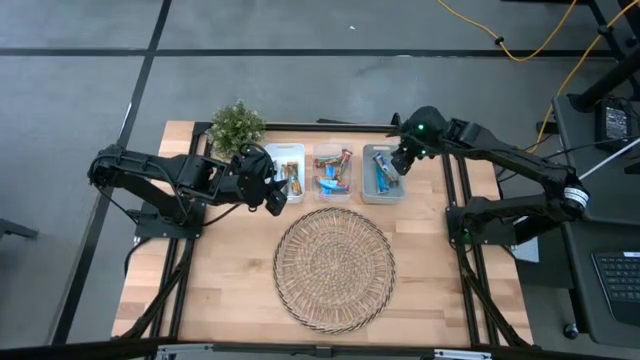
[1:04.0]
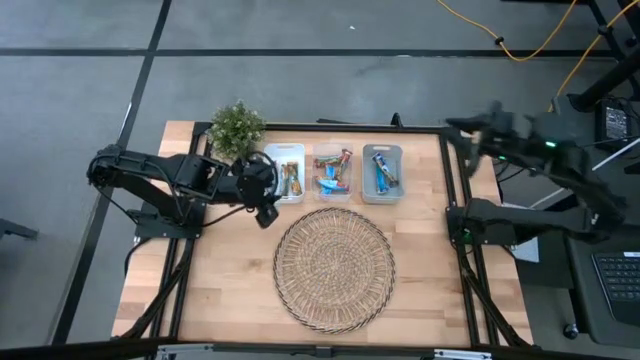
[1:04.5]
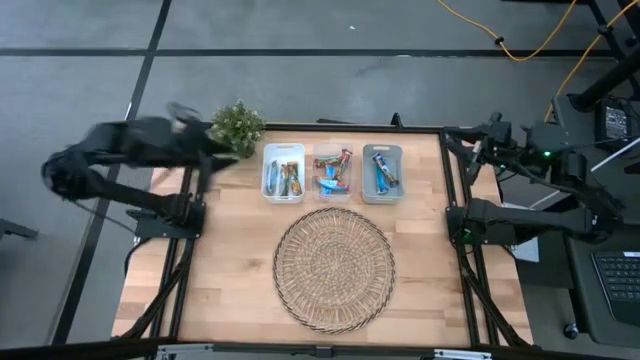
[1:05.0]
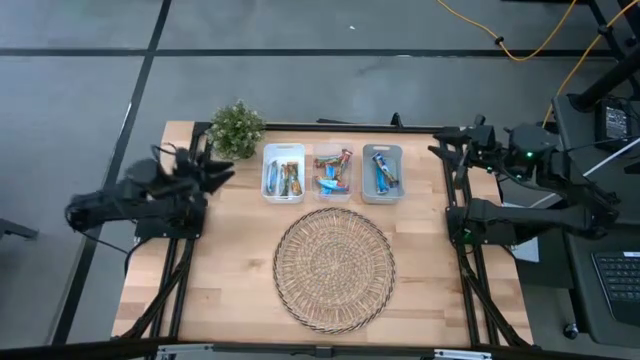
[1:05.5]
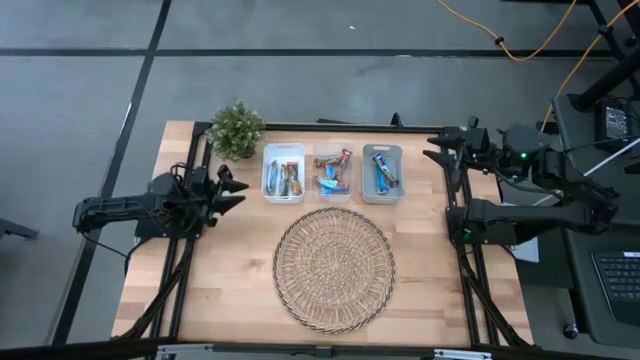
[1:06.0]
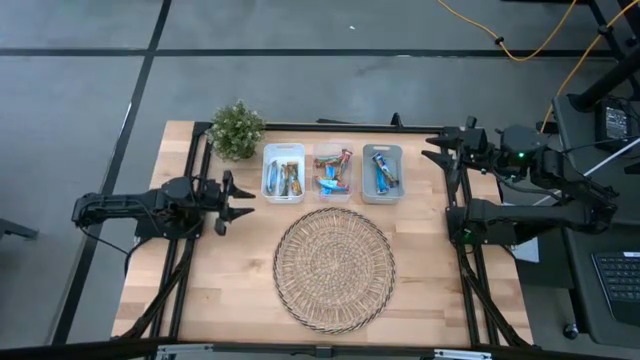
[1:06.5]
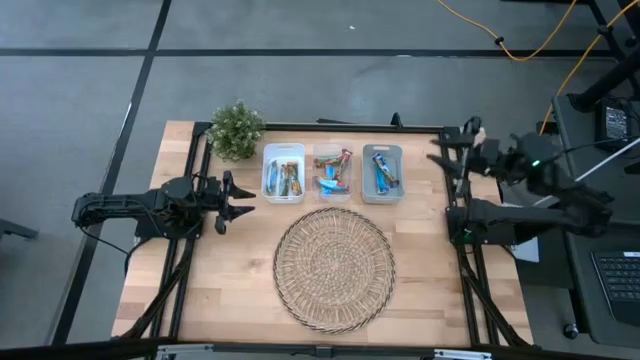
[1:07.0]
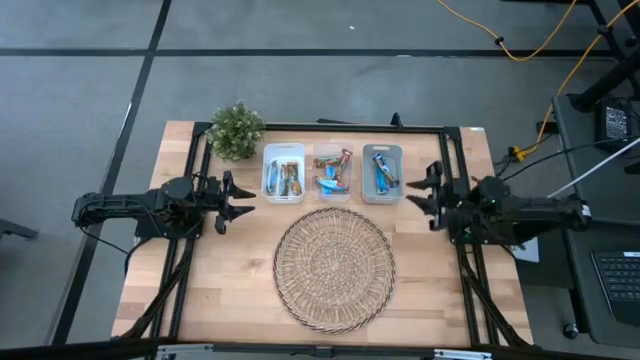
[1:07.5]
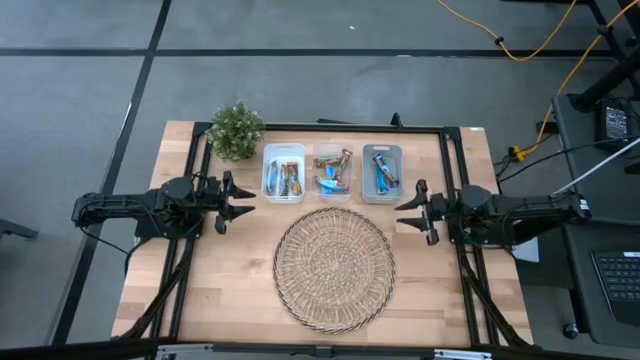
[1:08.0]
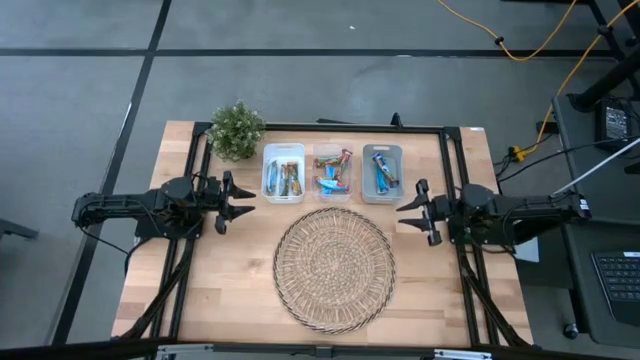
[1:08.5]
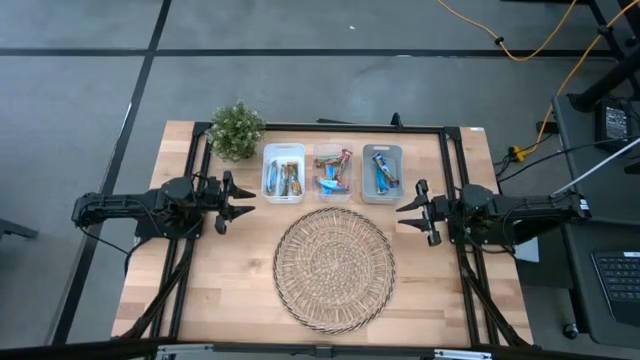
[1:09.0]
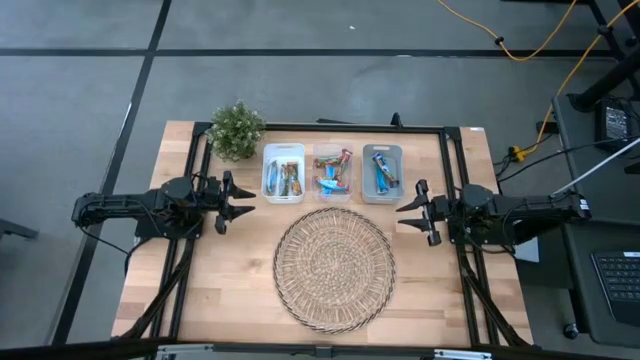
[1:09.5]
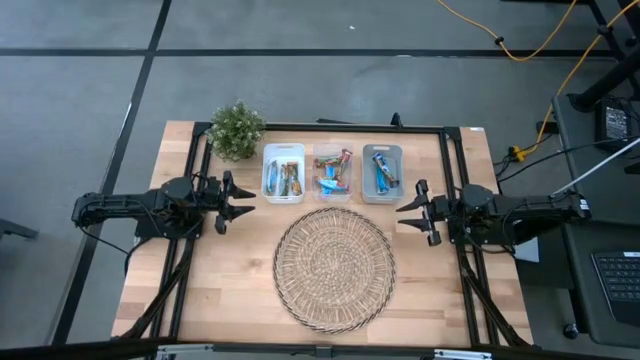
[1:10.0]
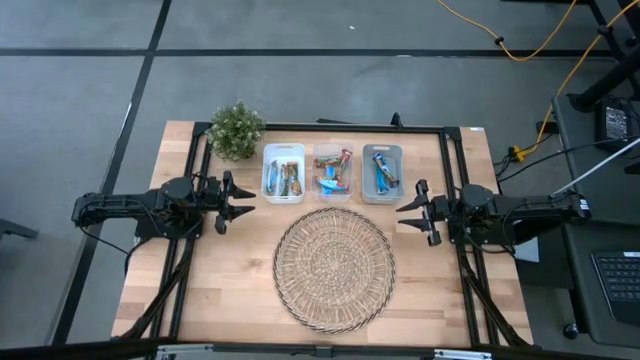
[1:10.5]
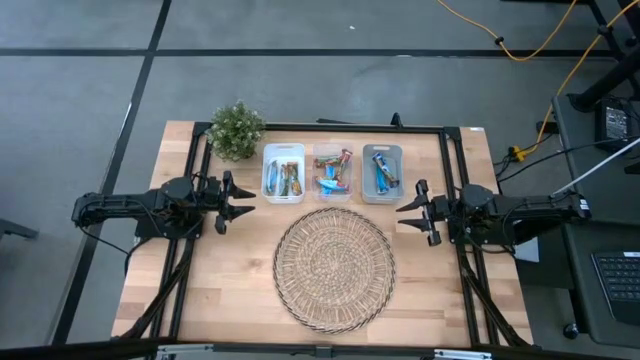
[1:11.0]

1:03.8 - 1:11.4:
Task: Pick and place Granola Bars by type
Return to Home Position

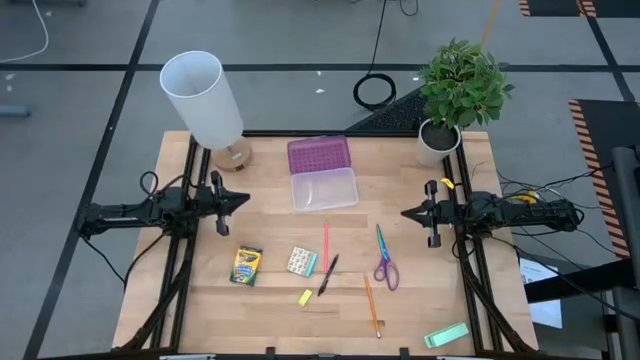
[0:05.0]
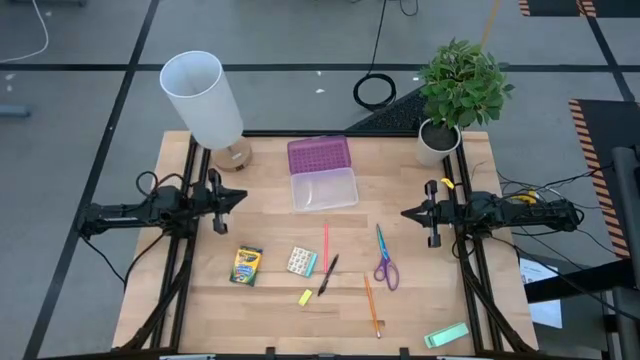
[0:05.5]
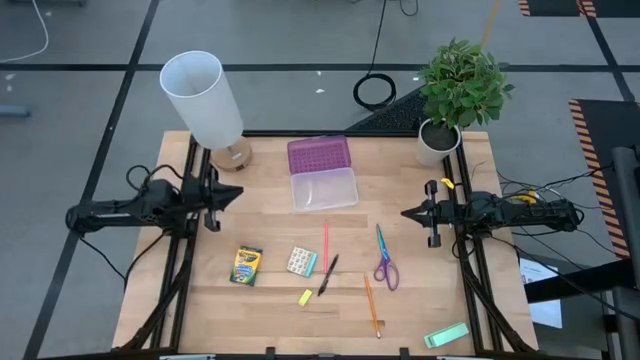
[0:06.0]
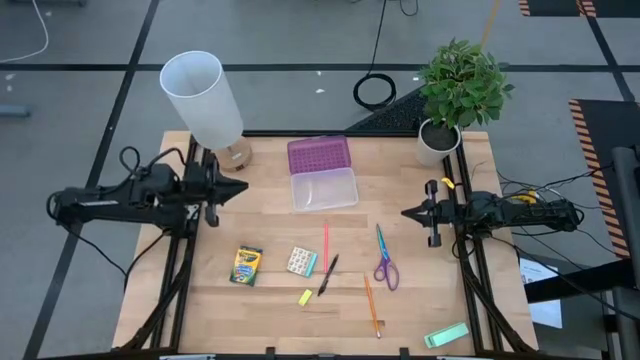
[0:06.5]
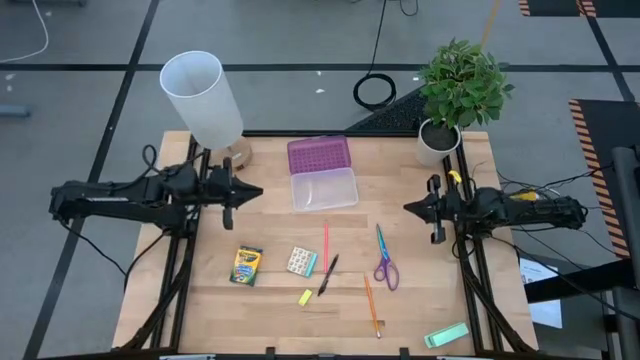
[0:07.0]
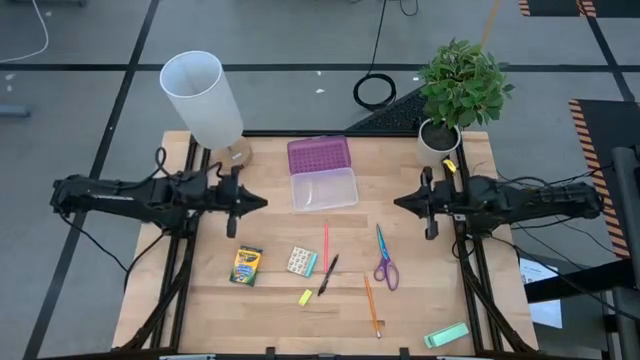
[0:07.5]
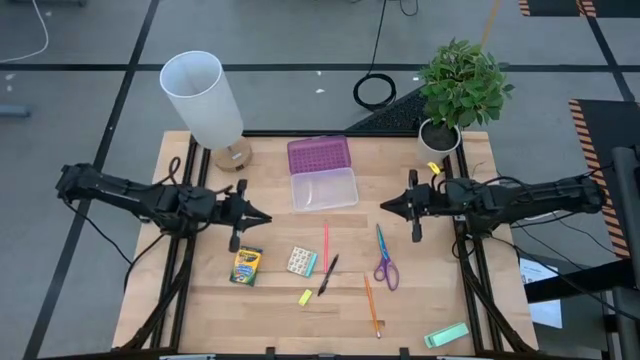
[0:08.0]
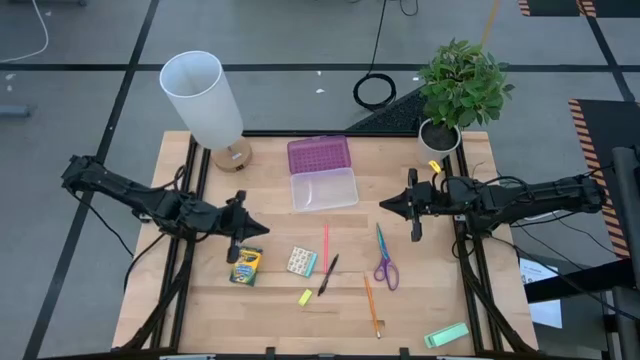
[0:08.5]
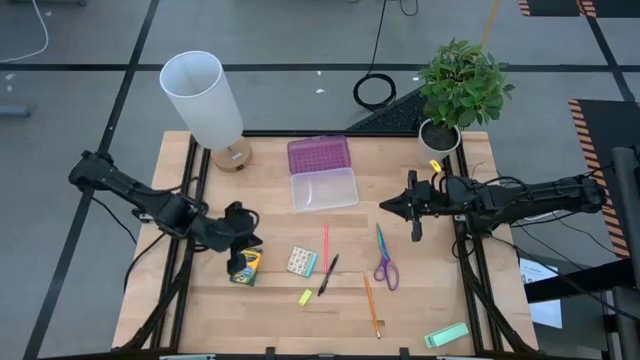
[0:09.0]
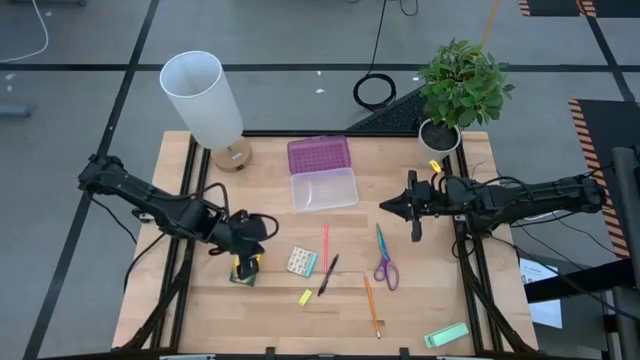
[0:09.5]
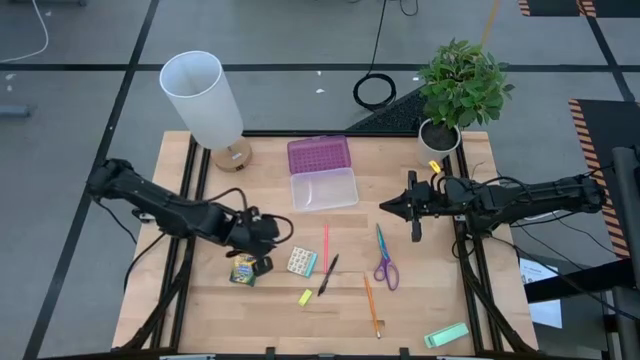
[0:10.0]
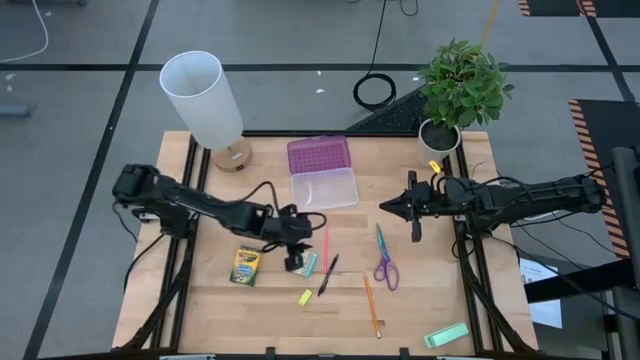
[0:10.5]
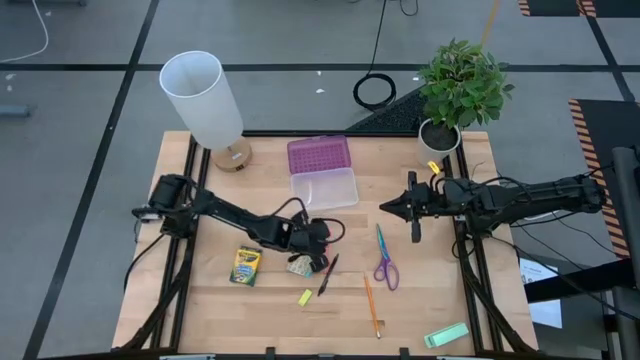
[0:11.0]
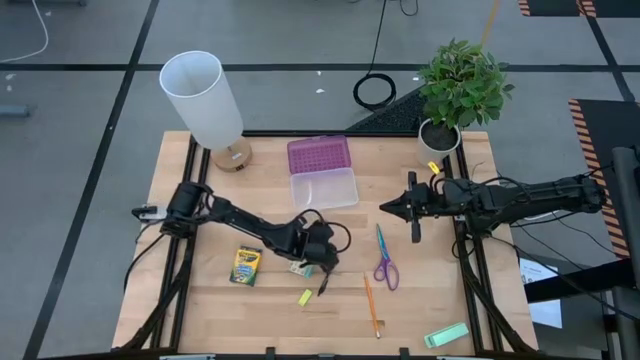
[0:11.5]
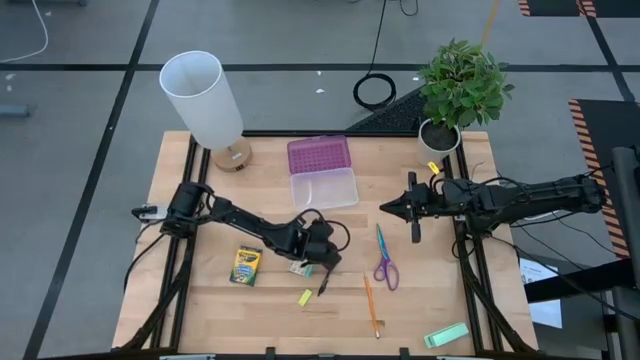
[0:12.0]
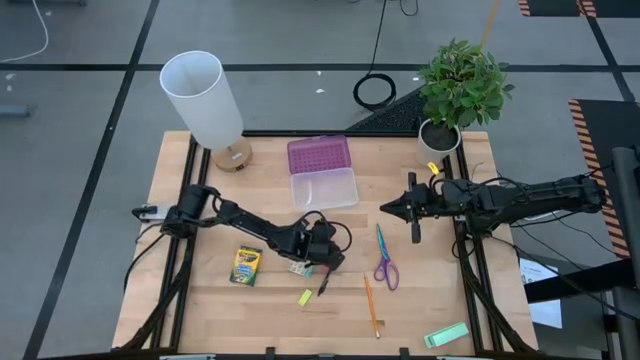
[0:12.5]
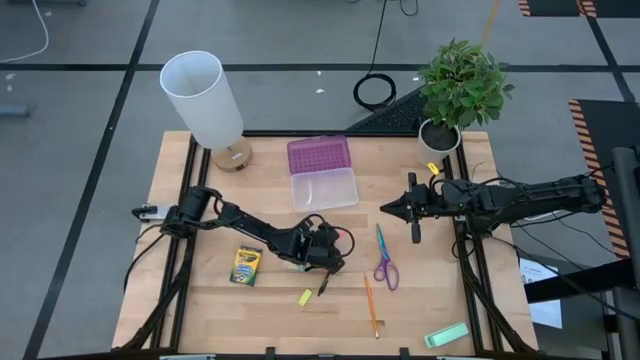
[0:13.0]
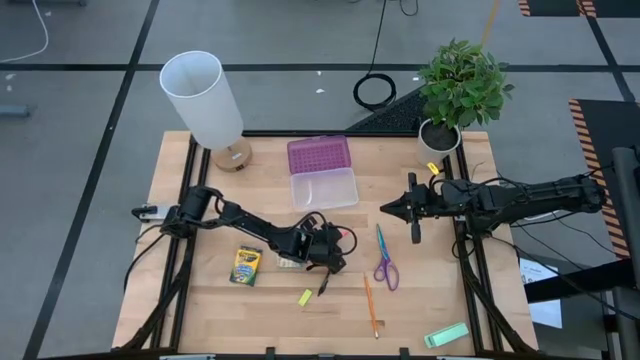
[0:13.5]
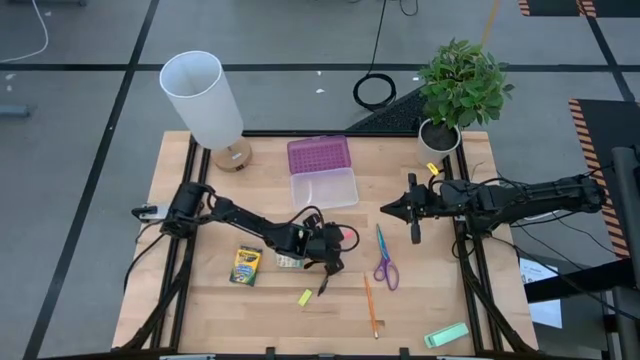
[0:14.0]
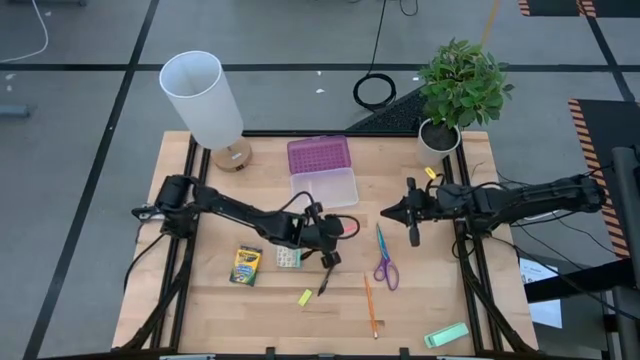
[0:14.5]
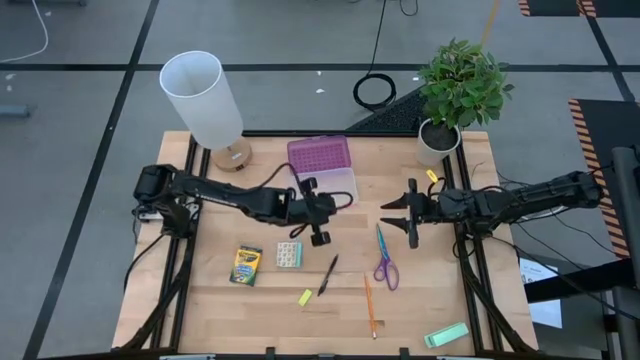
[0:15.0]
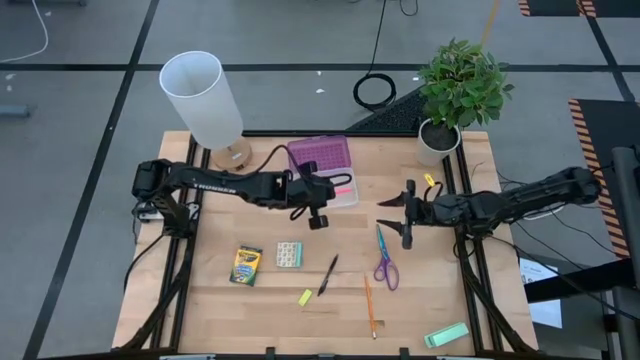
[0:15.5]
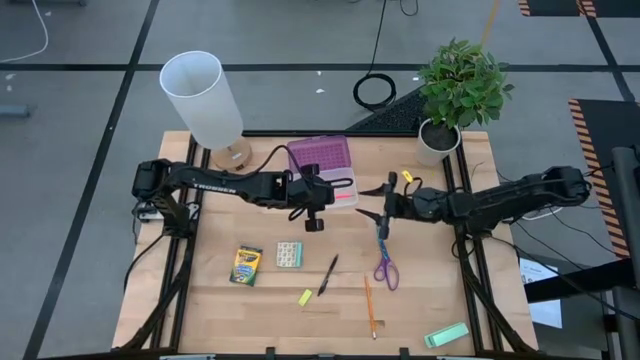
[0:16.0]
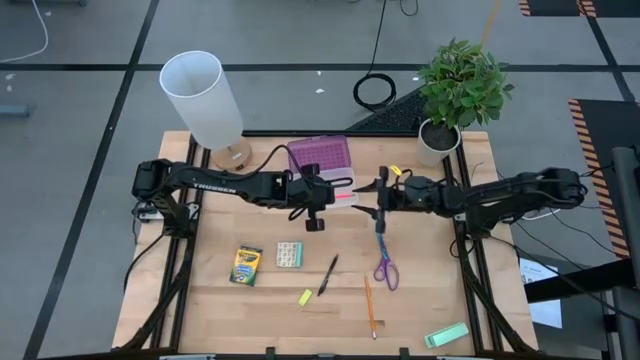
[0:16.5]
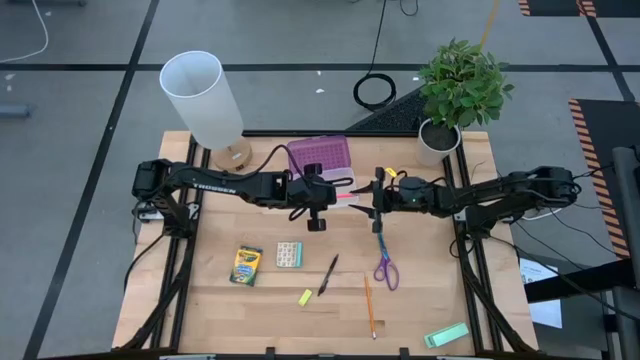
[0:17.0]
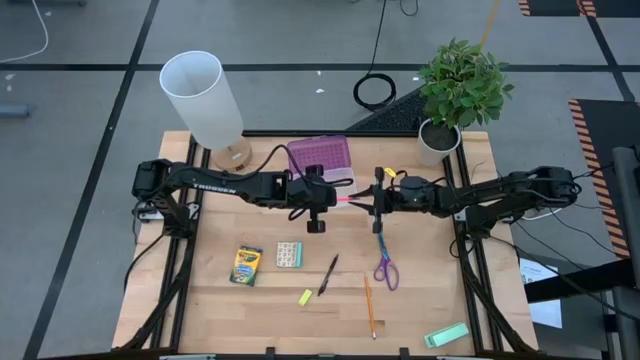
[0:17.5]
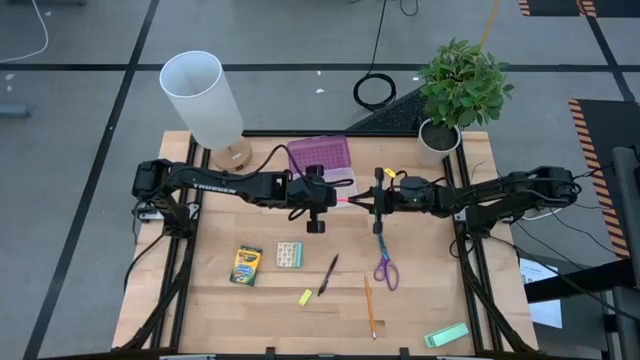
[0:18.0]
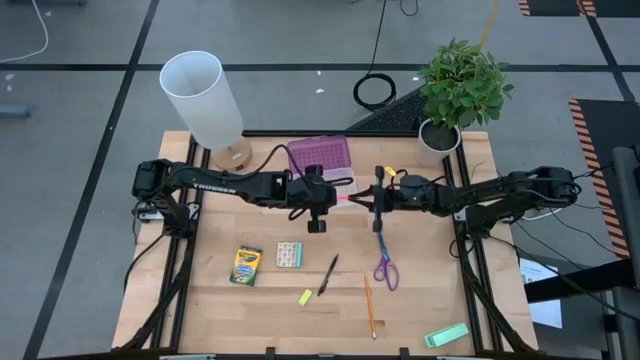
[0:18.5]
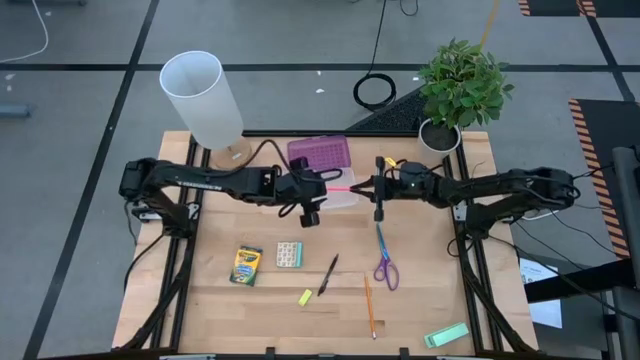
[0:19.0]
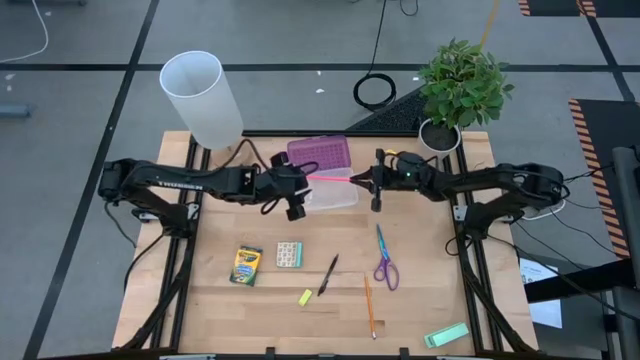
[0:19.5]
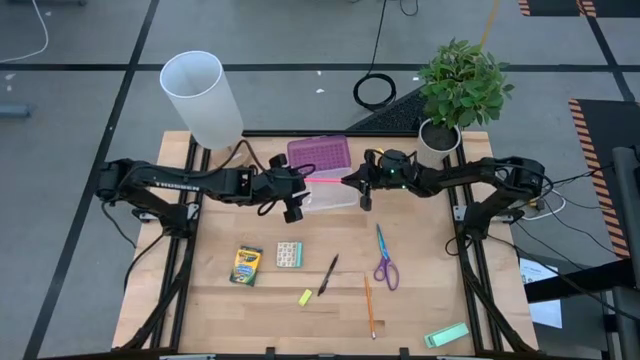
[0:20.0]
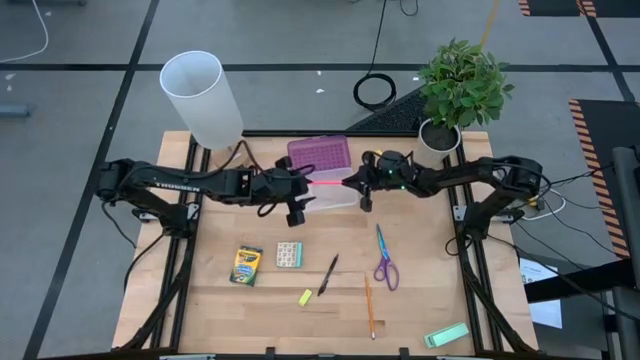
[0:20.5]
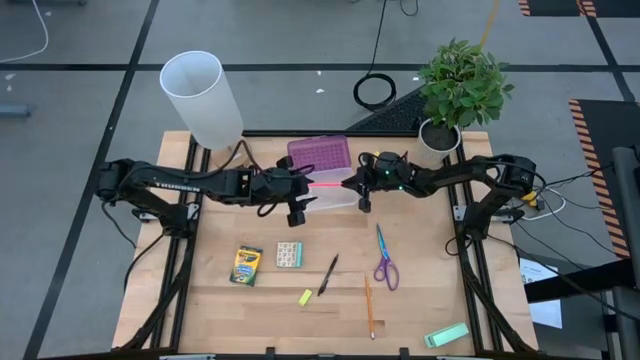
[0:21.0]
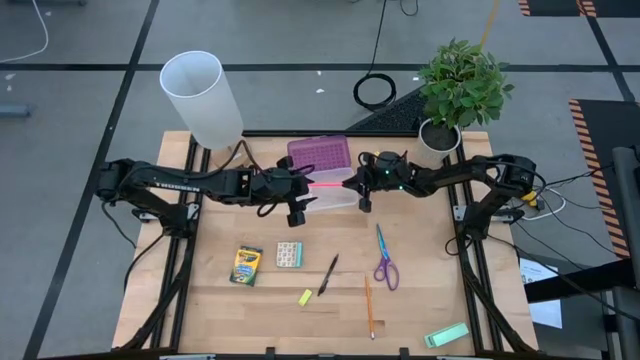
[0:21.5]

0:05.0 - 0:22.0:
Task: Pack school essentials
Put the pink pencil into the purple supply box
